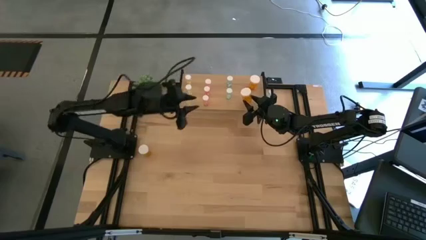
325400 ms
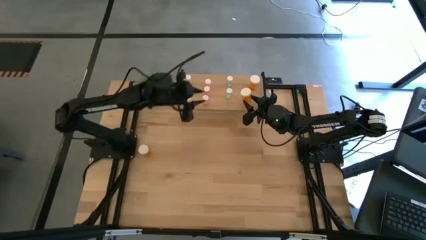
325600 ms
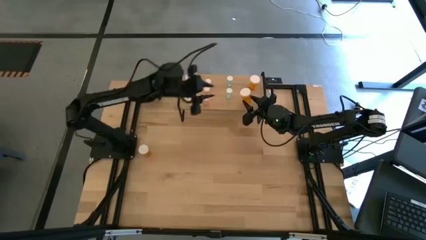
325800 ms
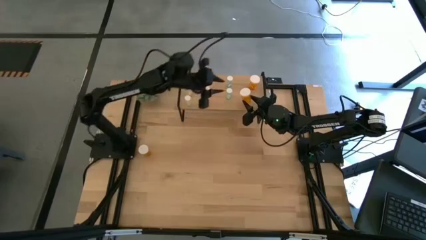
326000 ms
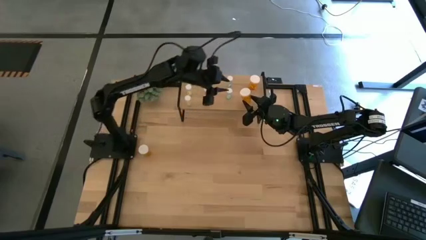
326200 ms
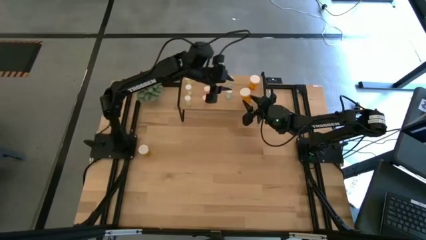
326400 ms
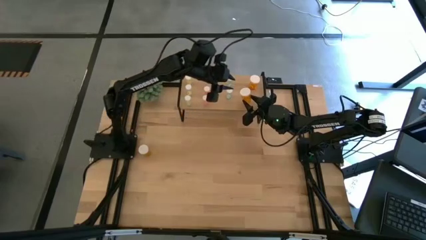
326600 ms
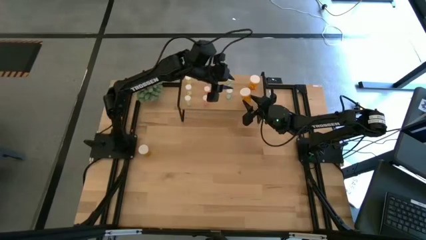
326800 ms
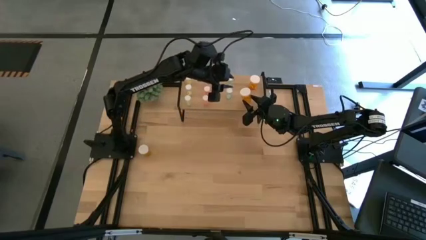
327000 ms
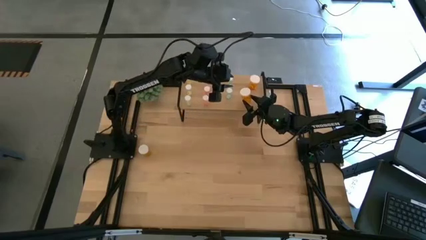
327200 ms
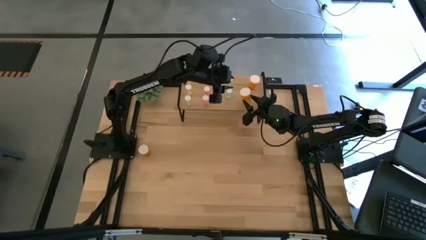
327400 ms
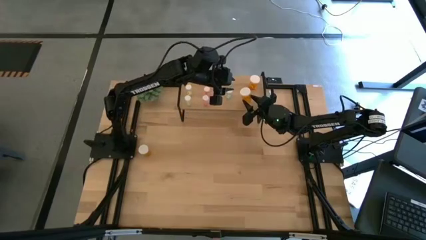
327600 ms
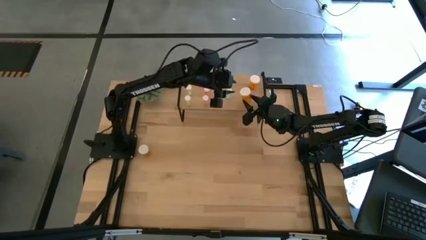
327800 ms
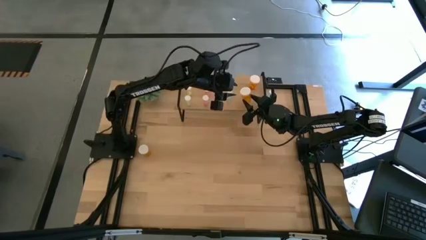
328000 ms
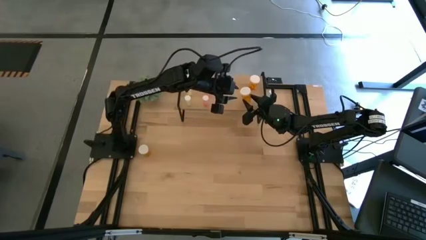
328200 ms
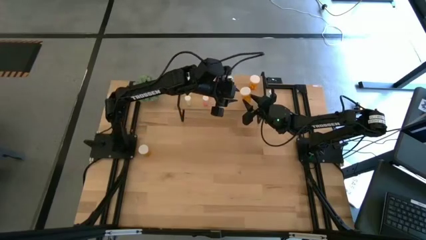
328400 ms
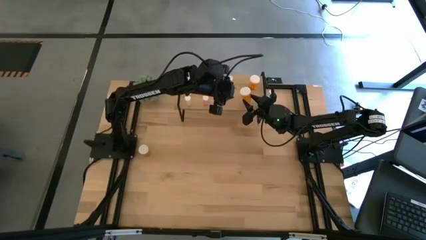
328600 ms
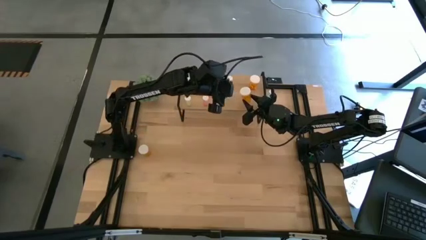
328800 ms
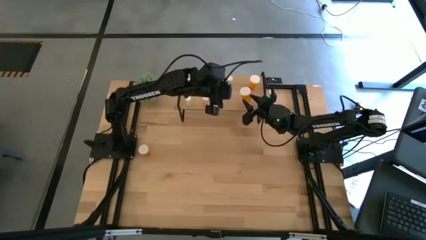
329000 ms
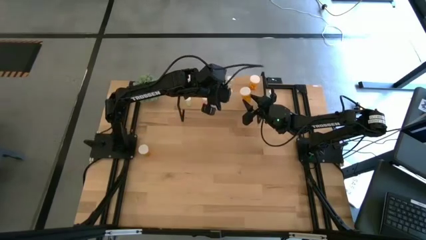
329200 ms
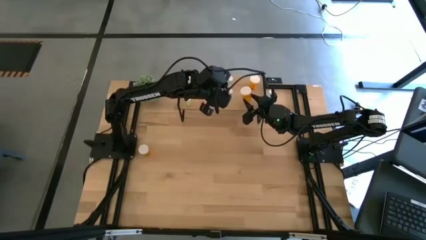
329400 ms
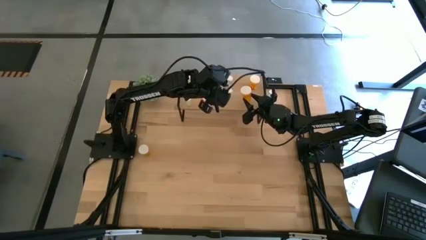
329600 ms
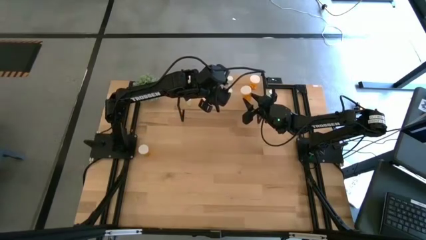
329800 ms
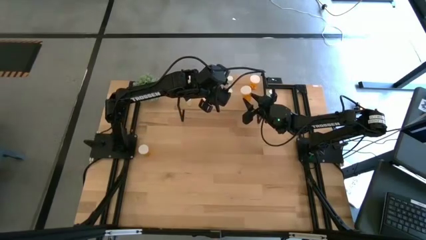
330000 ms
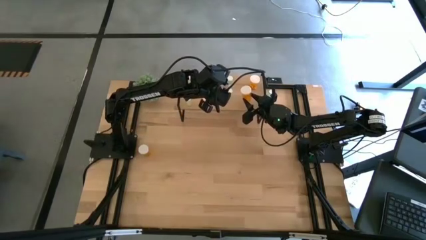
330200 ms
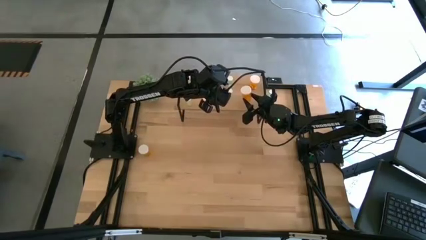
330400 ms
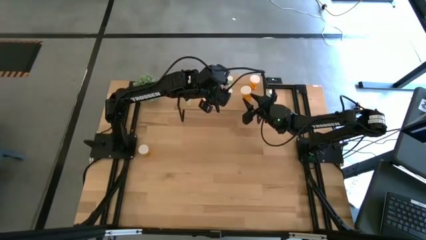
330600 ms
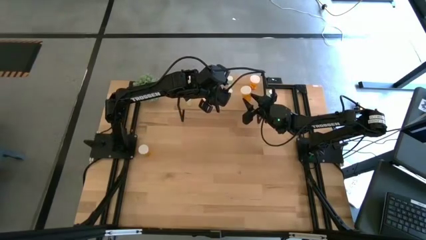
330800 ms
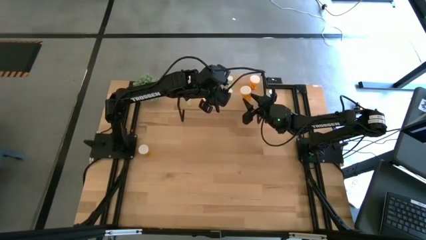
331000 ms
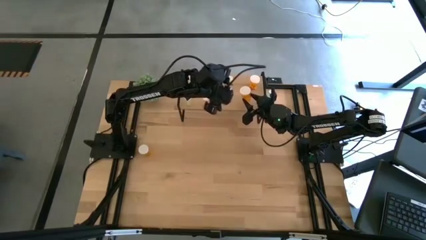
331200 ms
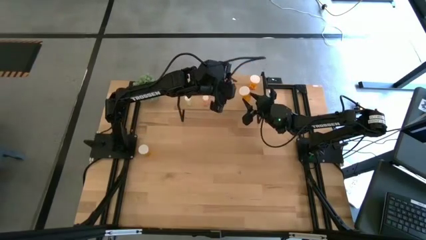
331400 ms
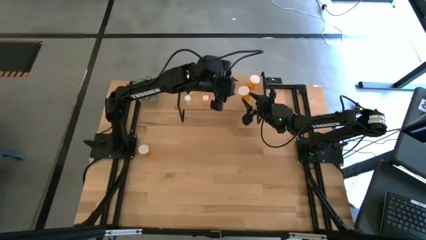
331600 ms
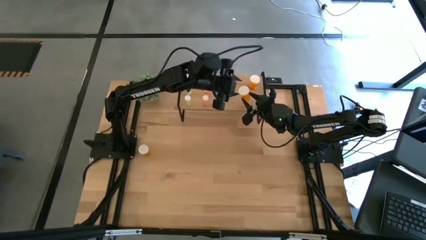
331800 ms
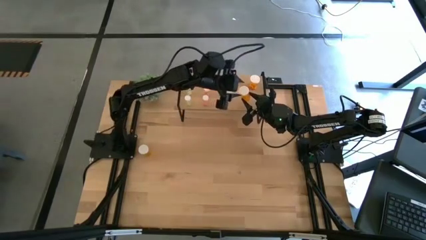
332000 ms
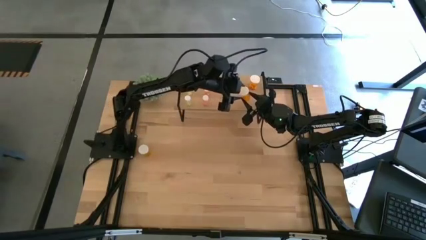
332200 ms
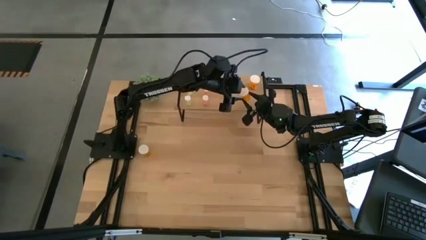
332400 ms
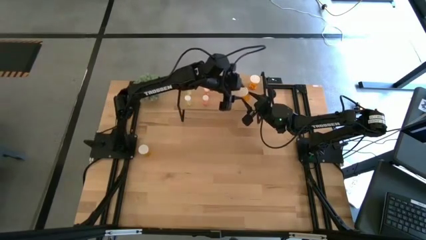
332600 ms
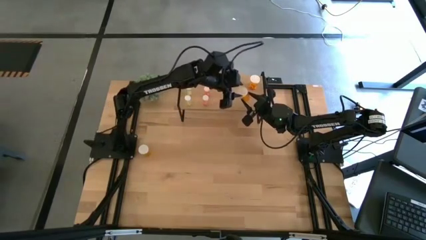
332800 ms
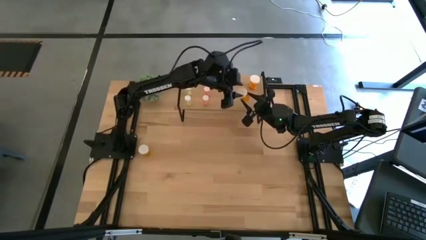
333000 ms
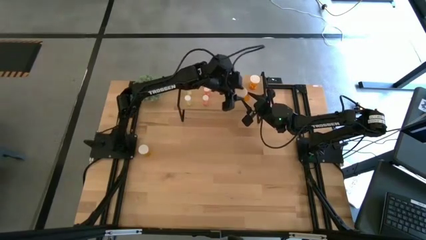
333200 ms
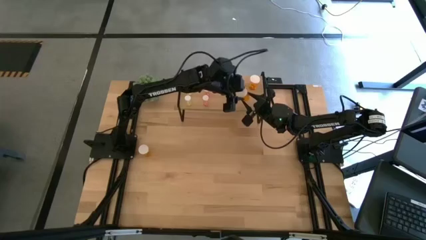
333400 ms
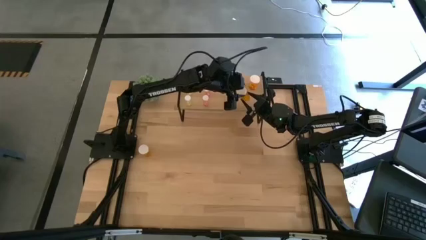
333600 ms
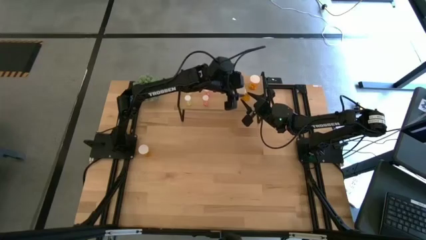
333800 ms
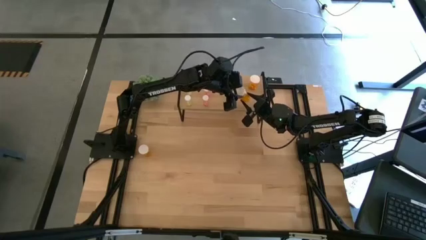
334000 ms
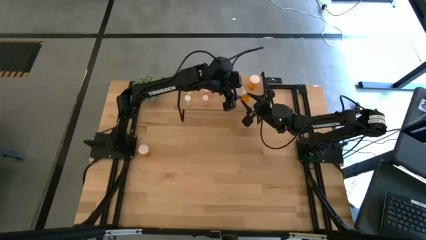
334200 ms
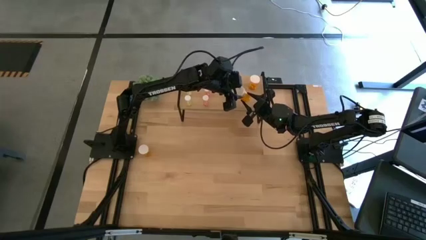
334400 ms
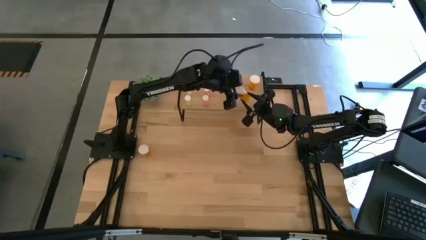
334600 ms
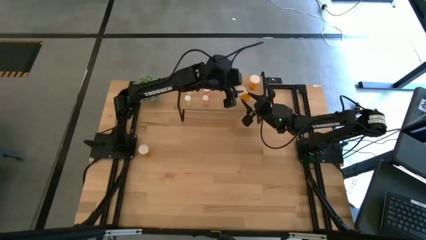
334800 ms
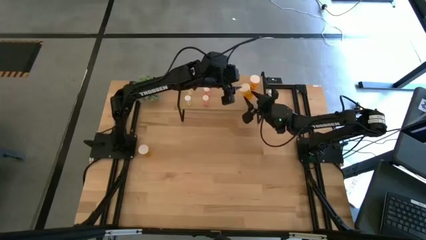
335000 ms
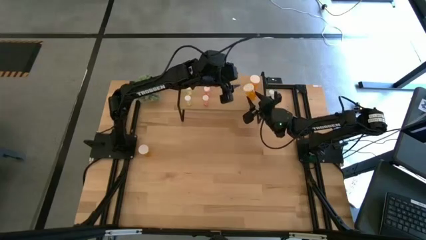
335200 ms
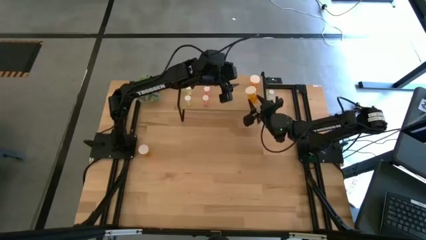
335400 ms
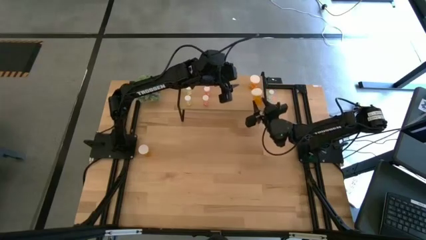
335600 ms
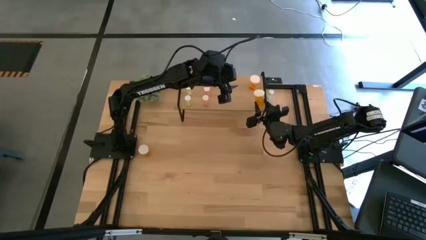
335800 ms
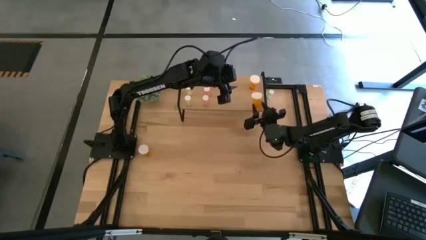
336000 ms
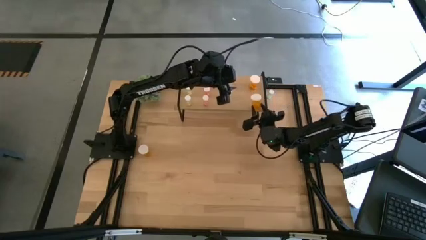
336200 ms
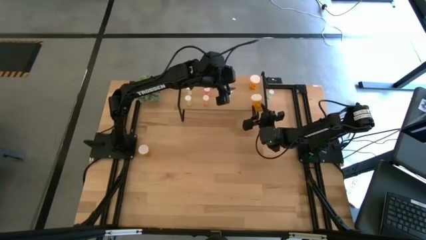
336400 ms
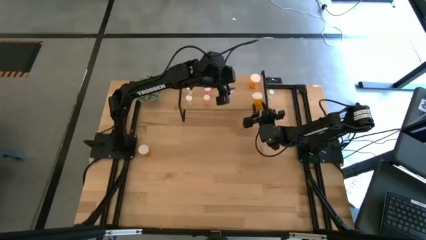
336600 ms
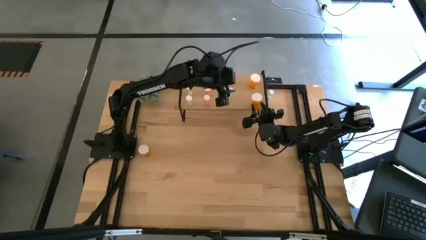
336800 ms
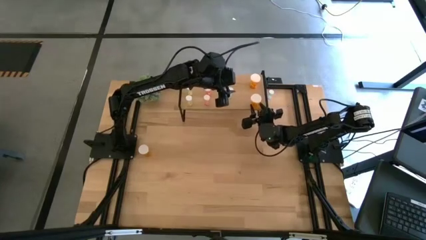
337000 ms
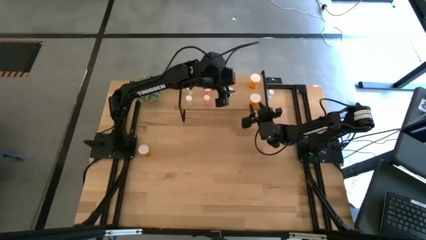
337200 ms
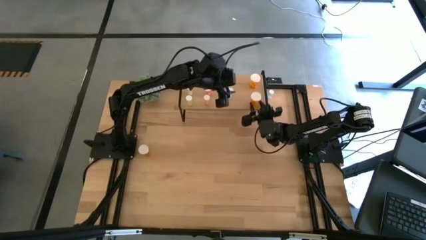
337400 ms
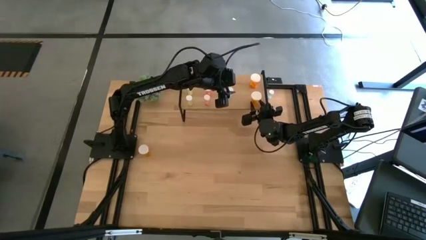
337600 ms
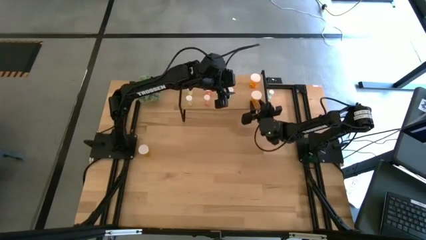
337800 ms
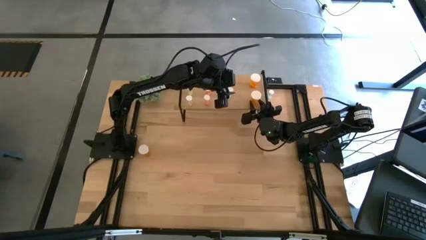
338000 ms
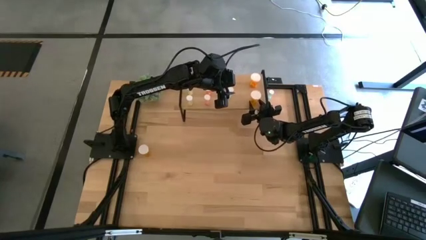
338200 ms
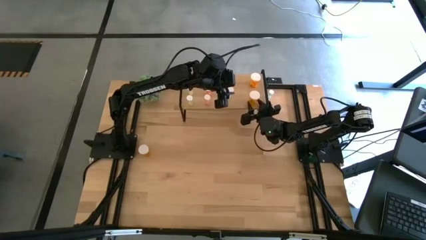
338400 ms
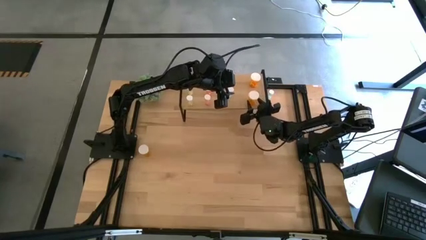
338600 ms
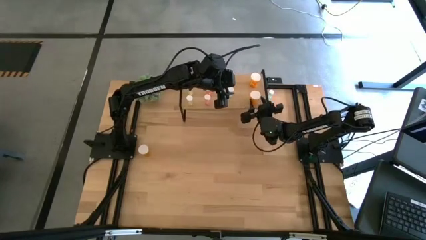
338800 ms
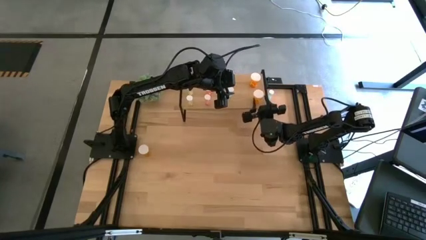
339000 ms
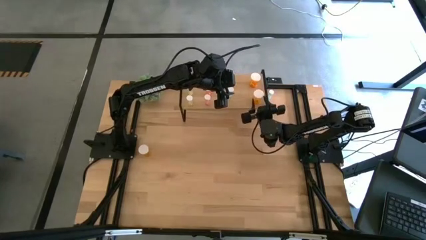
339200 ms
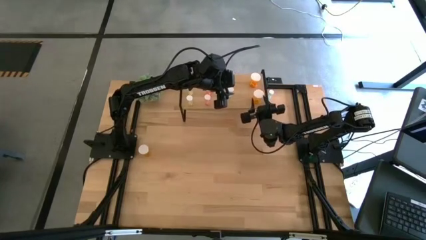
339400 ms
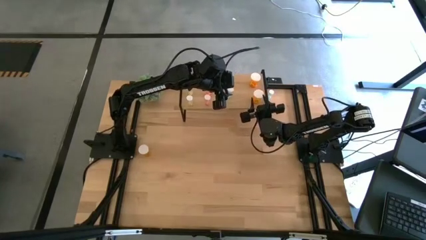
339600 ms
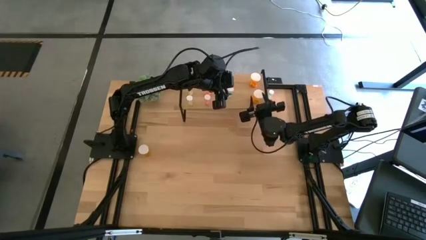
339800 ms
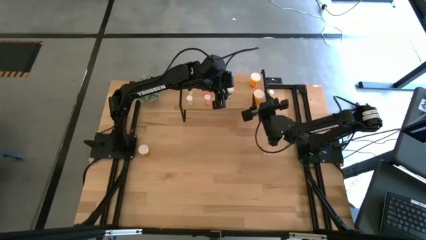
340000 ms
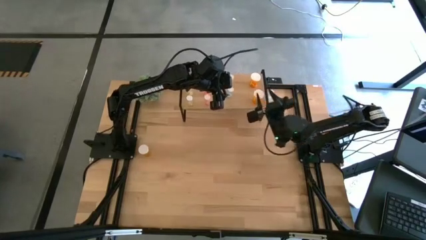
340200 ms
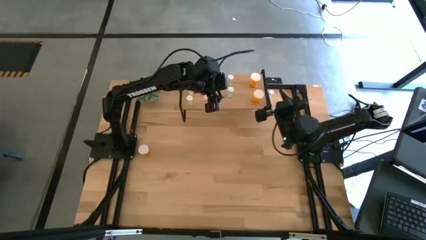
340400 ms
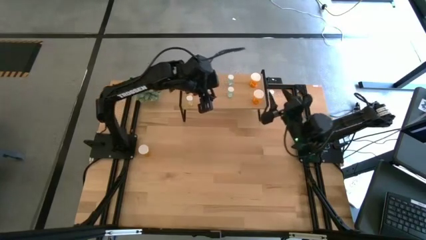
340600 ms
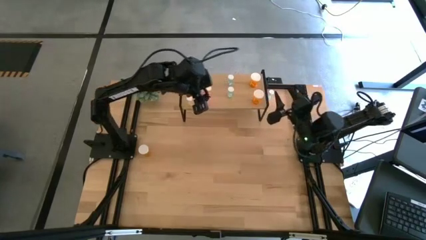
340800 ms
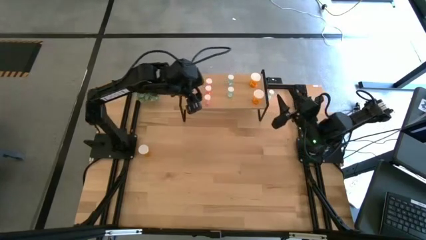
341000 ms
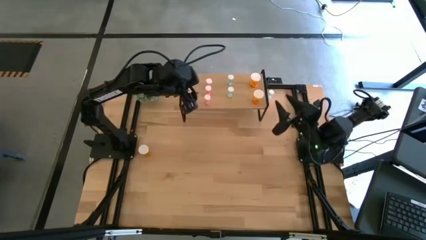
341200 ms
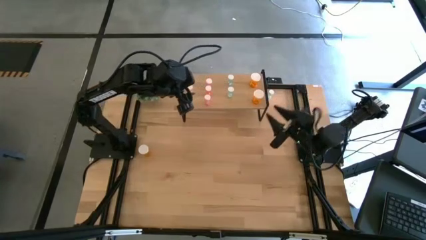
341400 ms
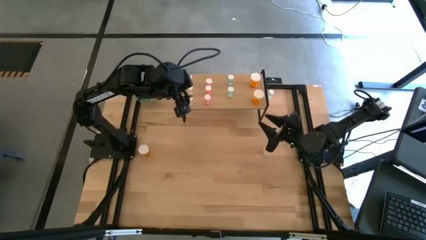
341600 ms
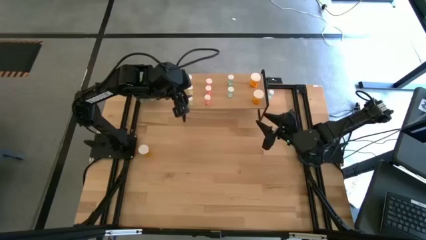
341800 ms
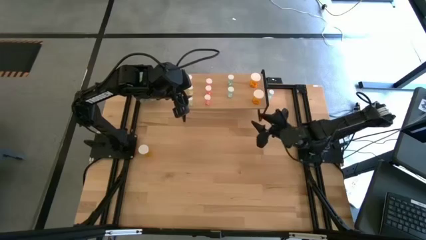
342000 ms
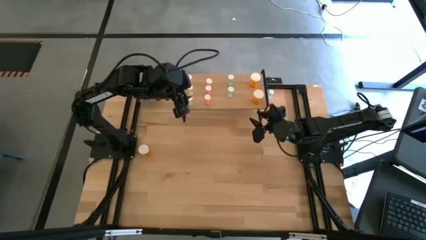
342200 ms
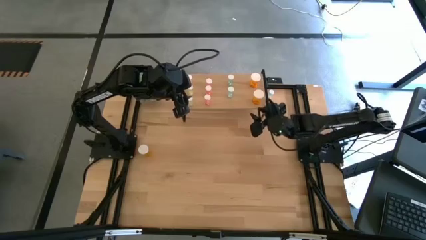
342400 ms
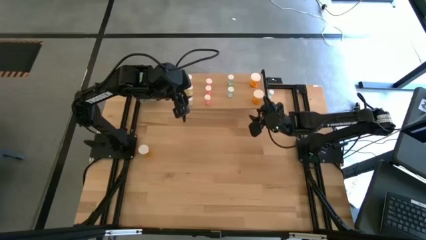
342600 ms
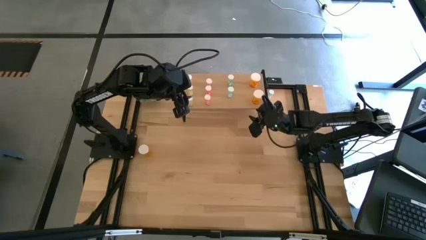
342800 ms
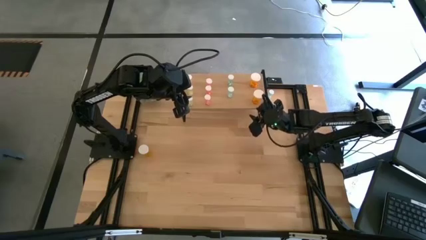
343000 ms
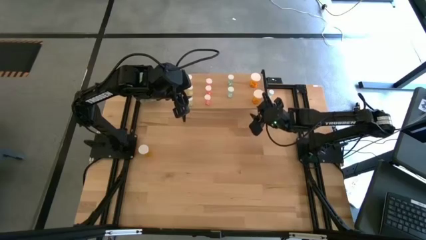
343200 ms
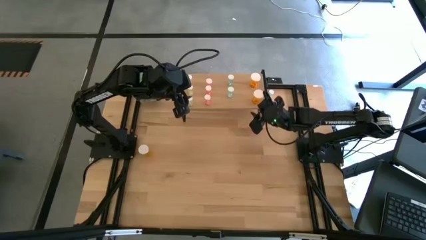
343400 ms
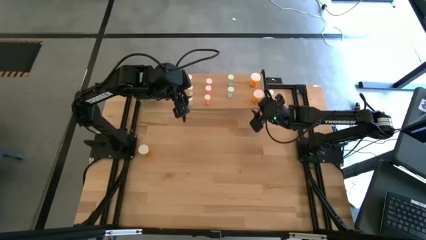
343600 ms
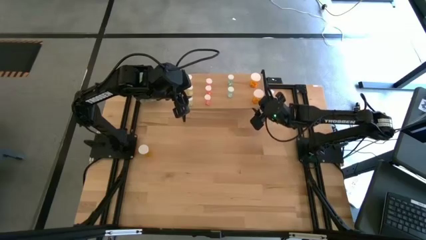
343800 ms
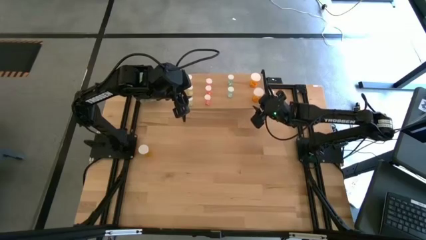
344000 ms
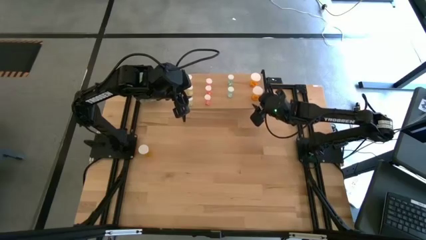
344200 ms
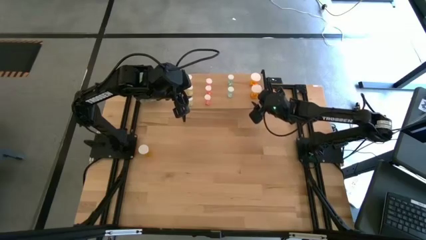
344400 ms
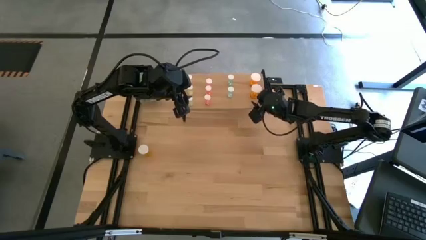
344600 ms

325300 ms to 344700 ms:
Task: Pick and place medicine bottles onto shelf by color
Put the right orange pill bottle on the shelf aligned with the other orange pill bottle
